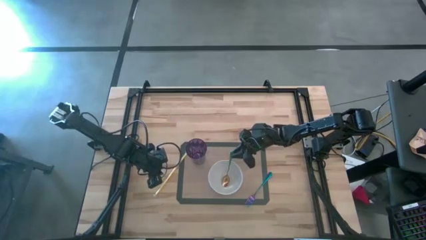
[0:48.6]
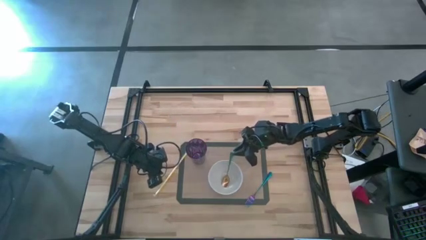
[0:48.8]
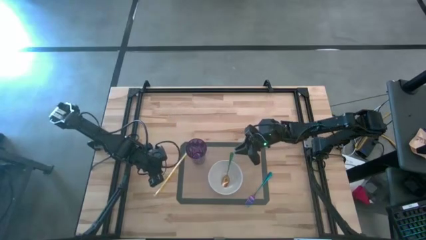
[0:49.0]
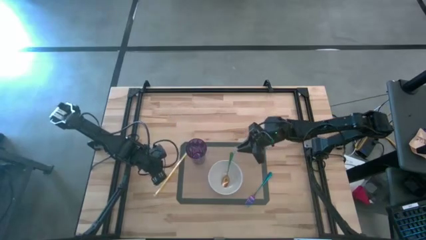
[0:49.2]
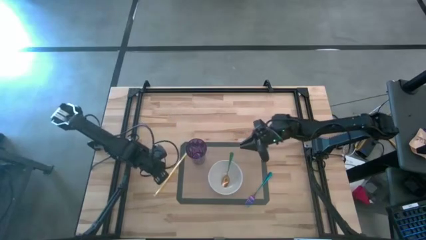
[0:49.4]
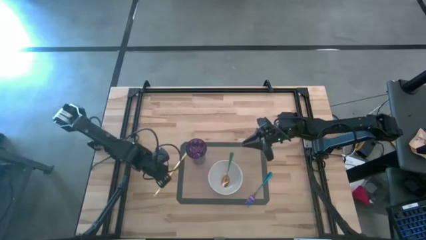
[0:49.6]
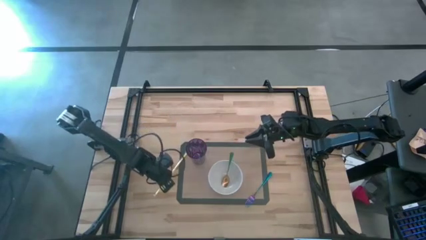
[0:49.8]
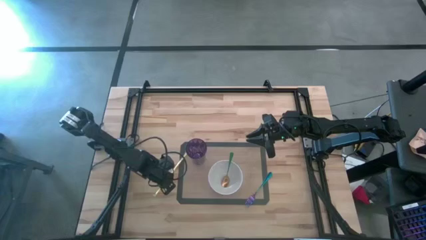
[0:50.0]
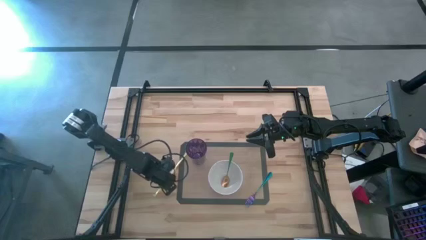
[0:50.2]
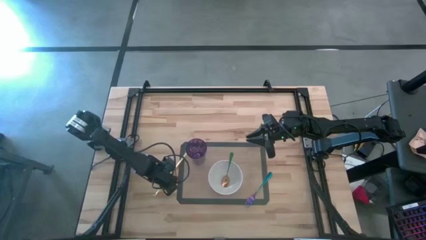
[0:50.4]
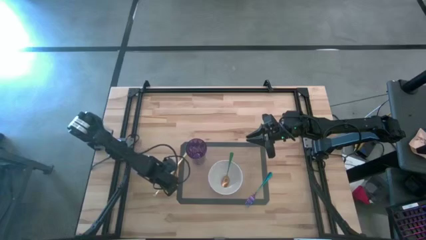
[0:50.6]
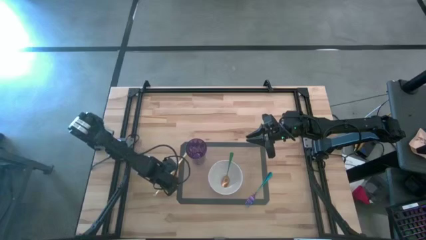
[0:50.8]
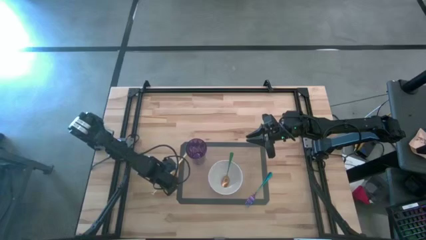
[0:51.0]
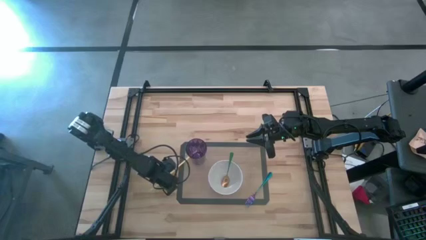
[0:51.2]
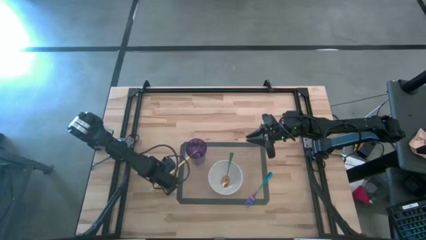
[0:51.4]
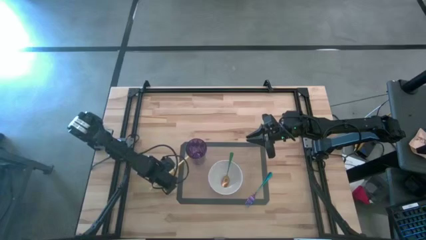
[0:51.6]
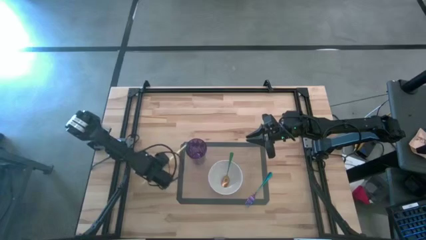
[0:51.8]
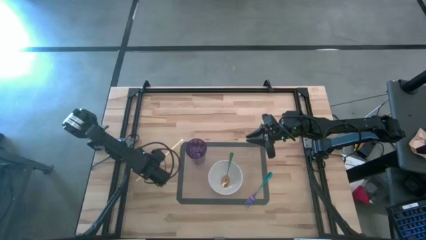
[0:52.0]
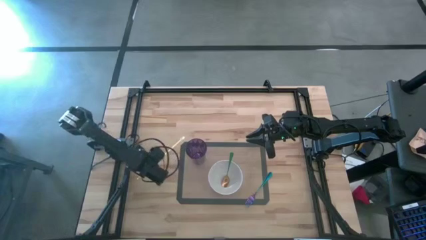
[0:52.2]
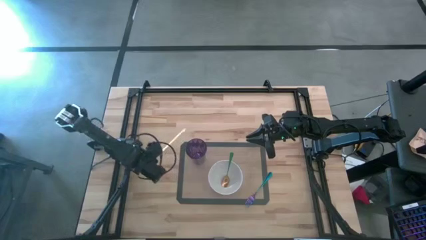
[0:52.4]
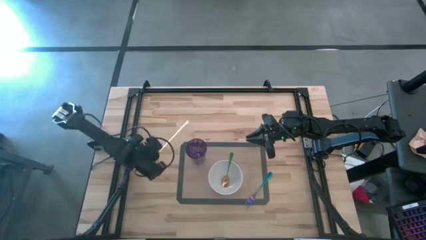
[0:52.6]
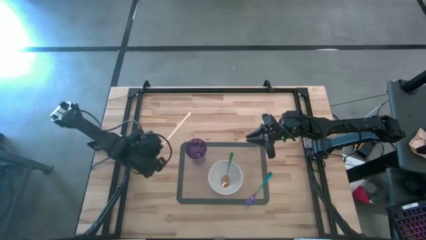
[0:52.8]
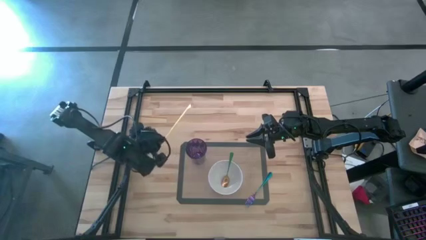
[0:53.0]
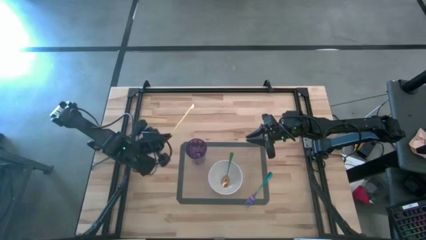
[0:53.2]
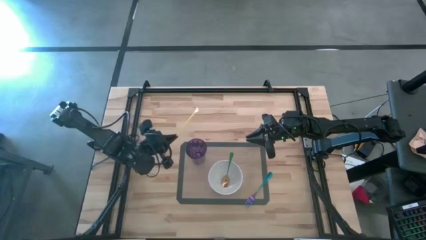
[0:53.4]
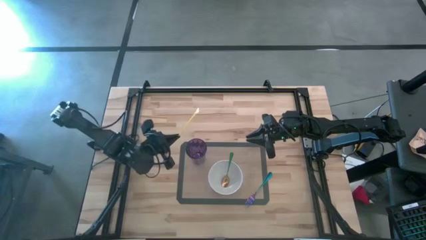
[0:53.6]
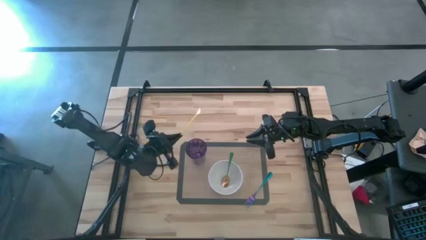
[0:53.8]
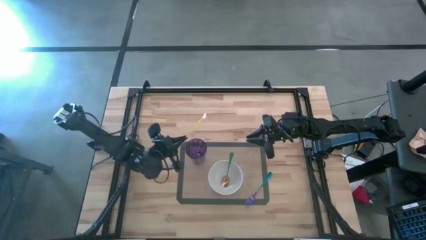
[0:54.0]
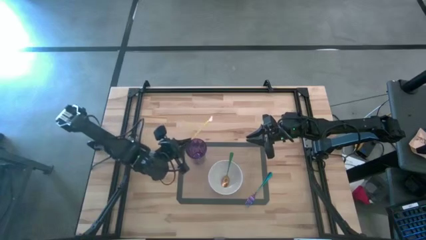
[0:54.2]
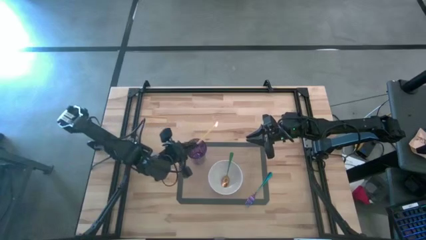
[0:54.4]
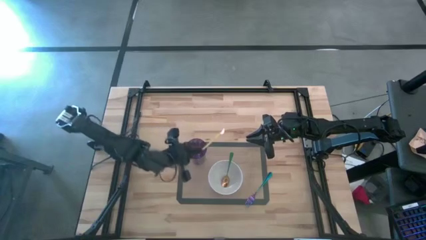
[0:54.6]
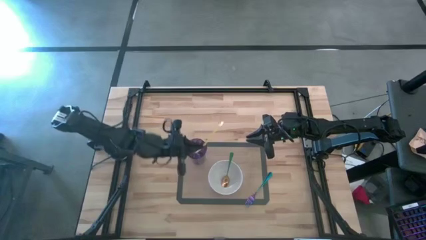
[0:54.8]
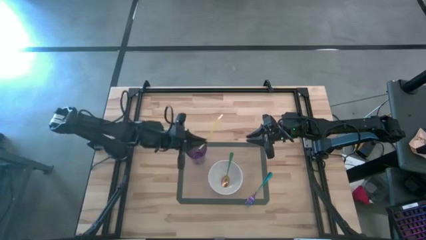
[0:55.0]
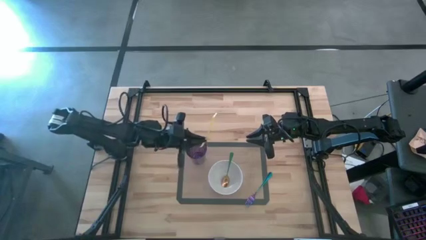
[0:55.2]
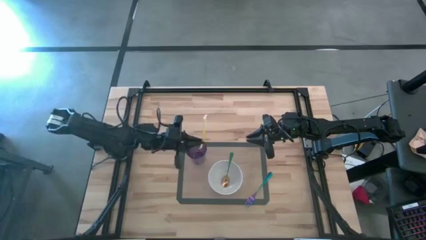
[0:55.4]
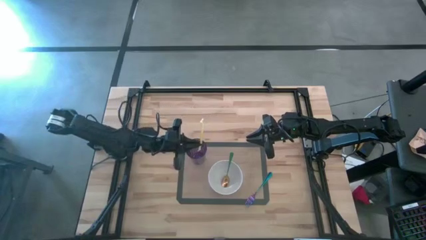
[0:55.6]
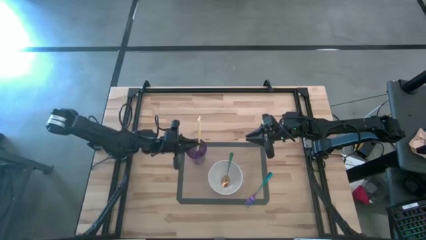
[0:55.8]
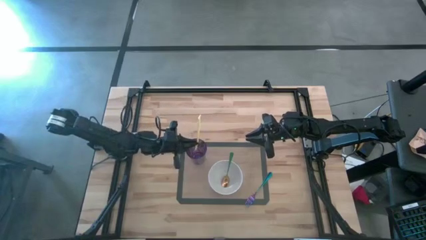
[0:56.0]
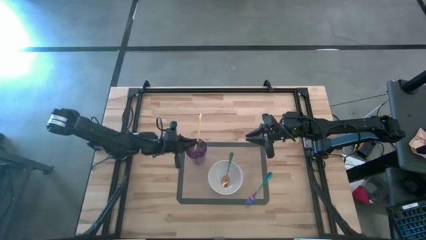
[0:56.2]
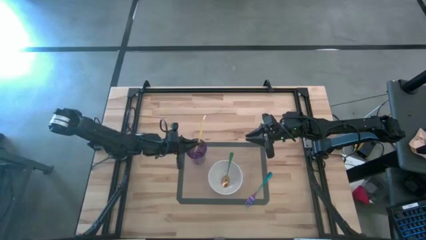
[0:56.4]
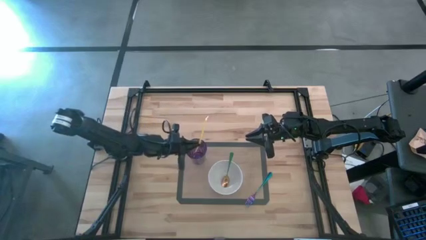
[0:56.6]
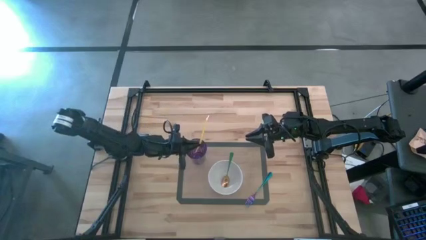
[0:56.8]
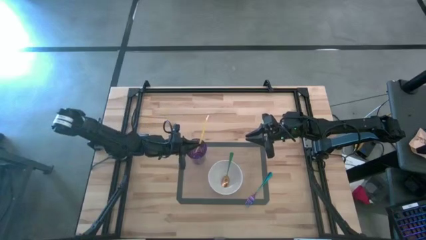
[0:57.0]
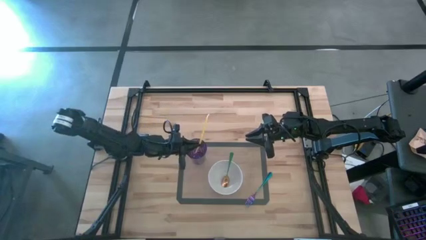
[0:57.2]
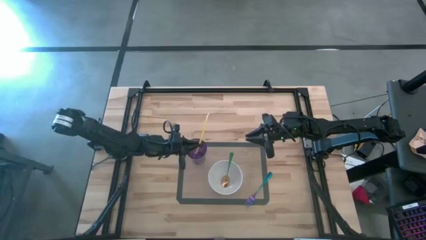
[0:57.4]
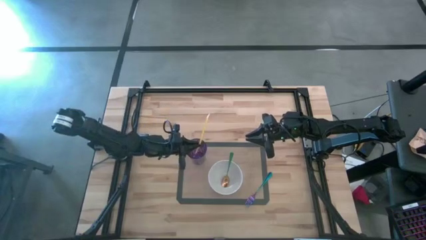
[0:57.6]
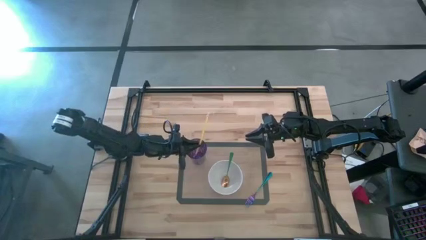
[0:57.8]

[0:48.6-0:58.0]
Task: Pick & Place Utensil
Put the yellow straw into the violet cup

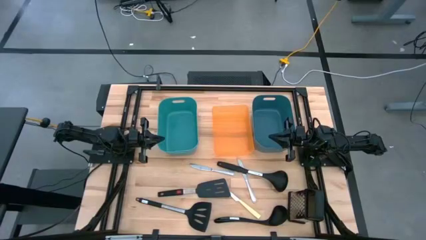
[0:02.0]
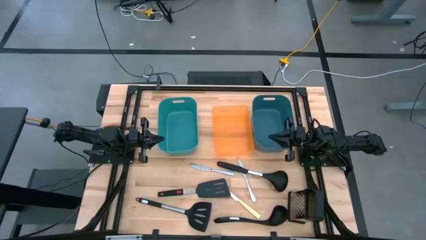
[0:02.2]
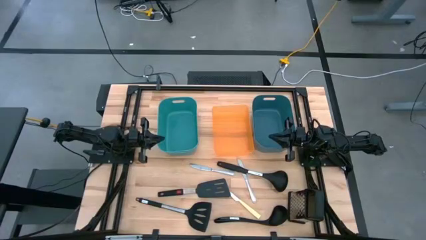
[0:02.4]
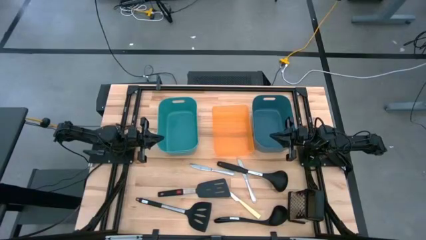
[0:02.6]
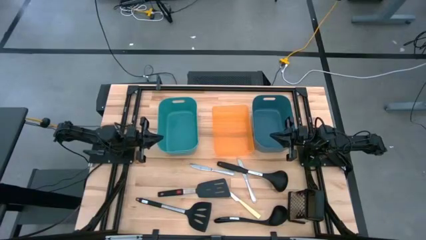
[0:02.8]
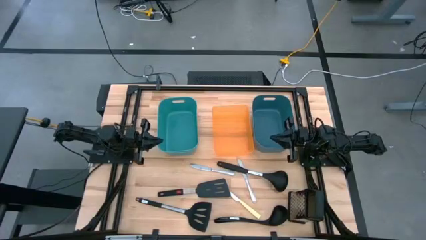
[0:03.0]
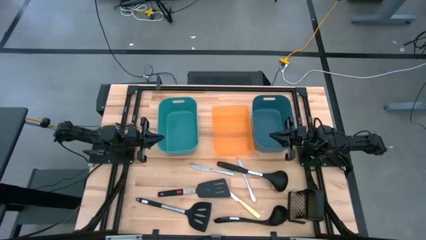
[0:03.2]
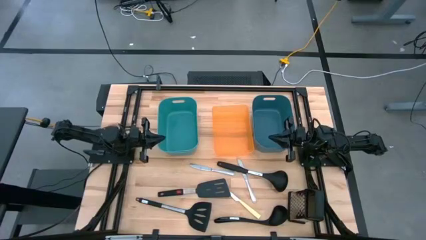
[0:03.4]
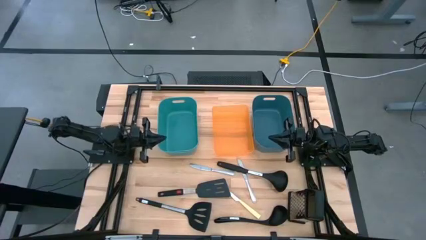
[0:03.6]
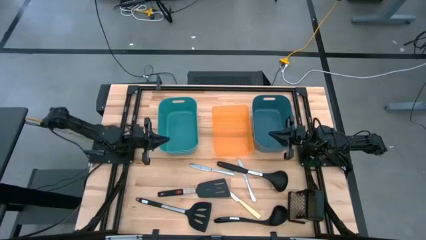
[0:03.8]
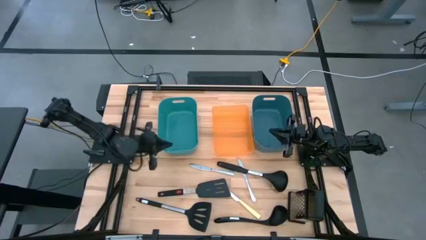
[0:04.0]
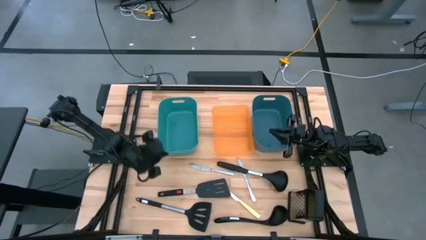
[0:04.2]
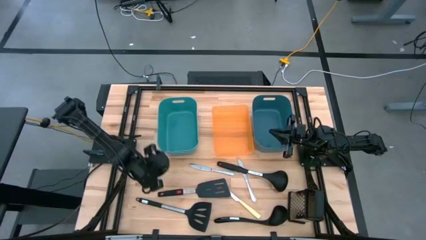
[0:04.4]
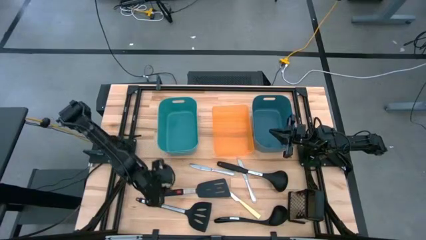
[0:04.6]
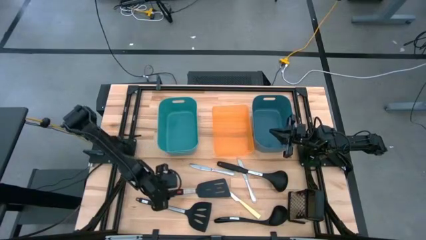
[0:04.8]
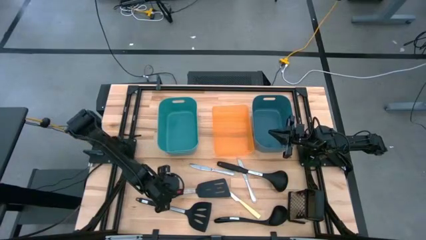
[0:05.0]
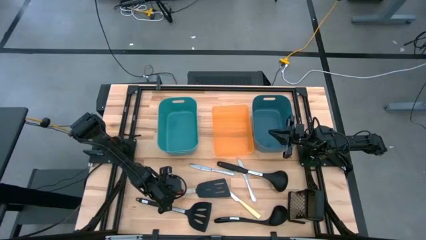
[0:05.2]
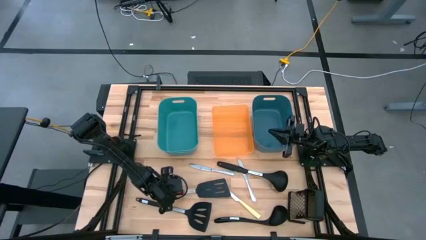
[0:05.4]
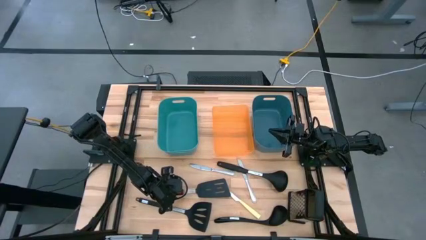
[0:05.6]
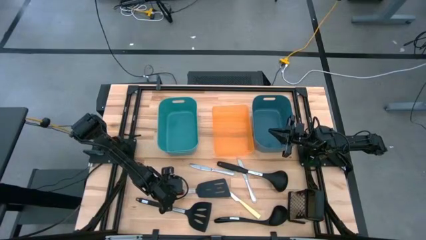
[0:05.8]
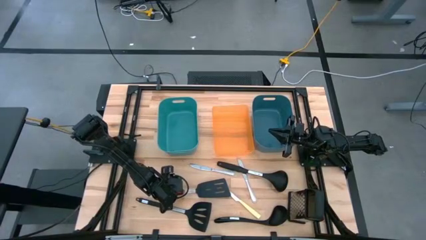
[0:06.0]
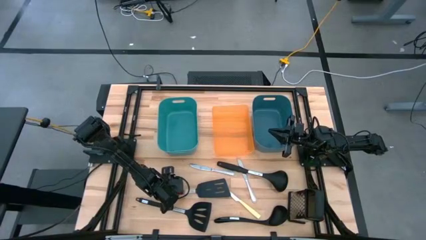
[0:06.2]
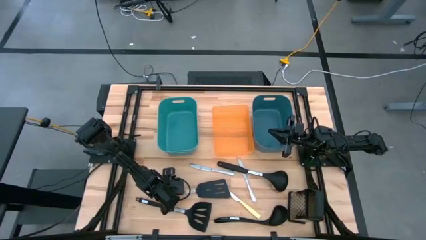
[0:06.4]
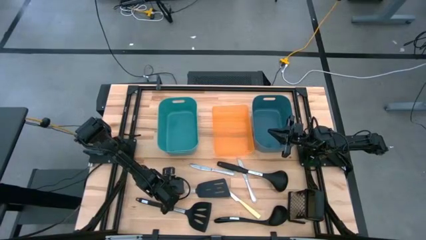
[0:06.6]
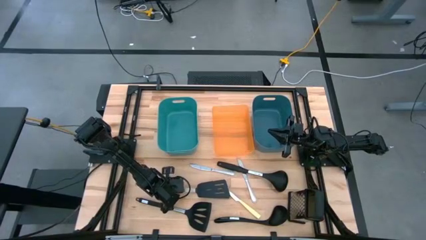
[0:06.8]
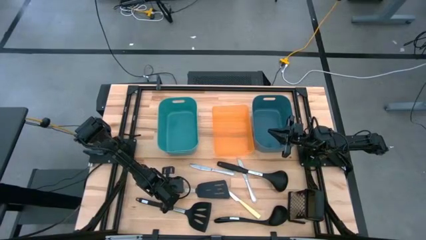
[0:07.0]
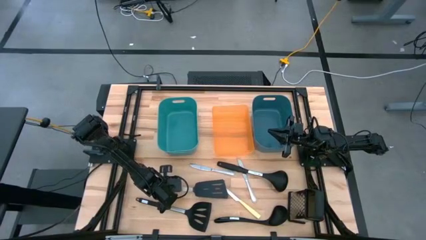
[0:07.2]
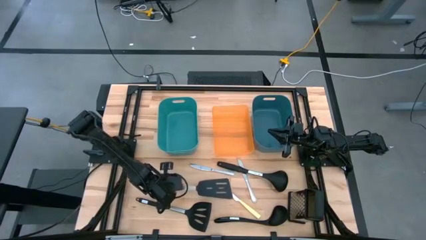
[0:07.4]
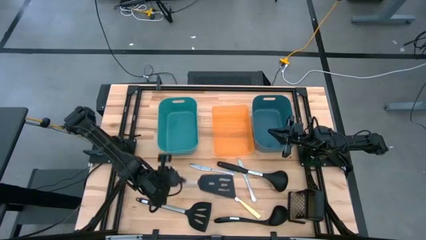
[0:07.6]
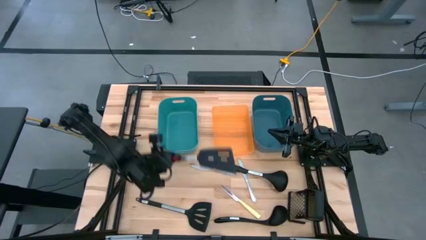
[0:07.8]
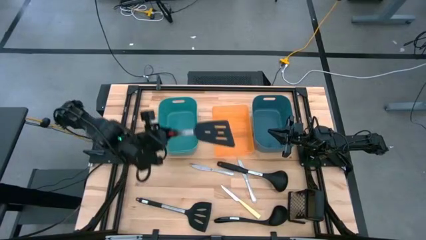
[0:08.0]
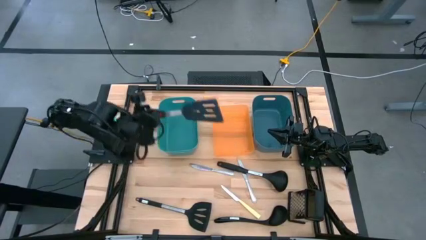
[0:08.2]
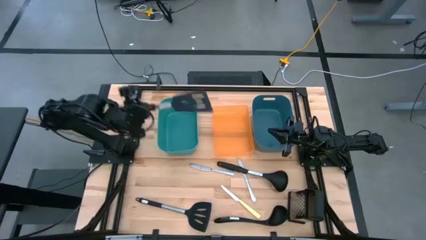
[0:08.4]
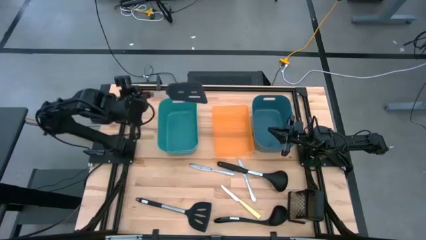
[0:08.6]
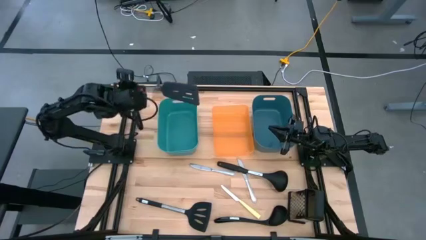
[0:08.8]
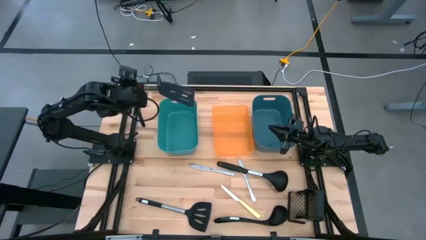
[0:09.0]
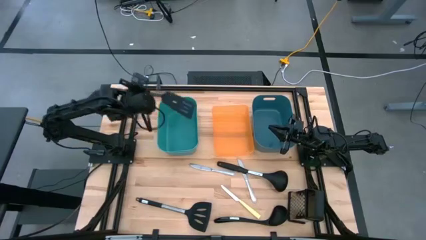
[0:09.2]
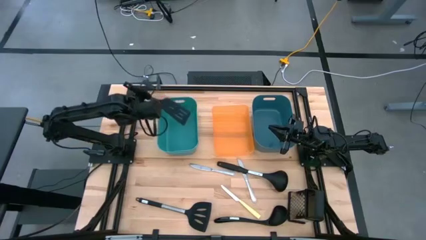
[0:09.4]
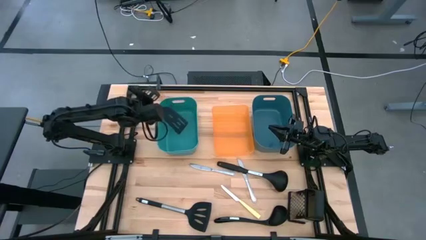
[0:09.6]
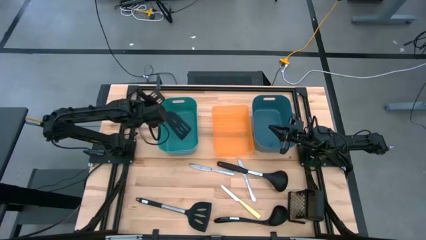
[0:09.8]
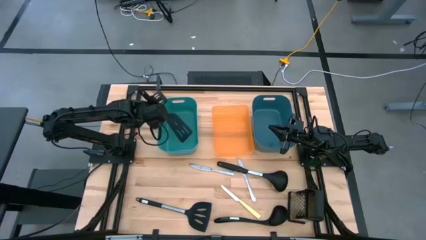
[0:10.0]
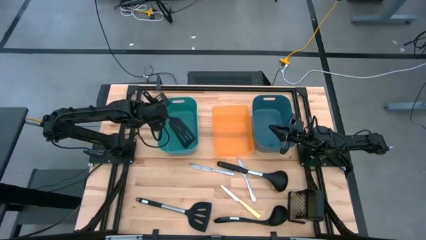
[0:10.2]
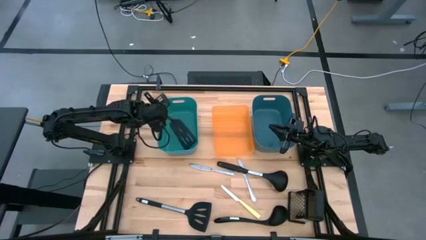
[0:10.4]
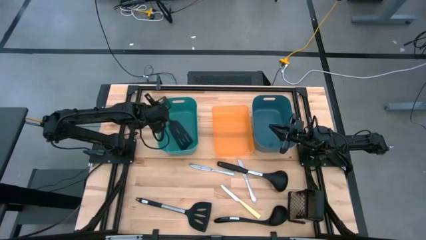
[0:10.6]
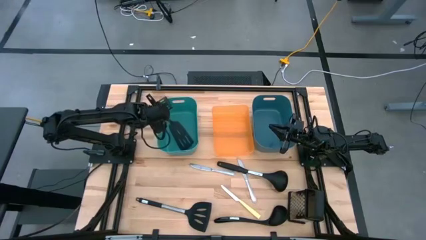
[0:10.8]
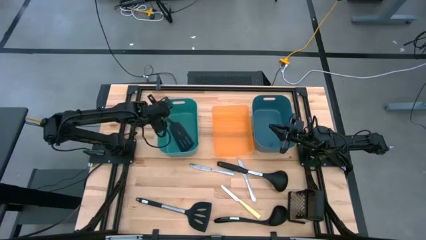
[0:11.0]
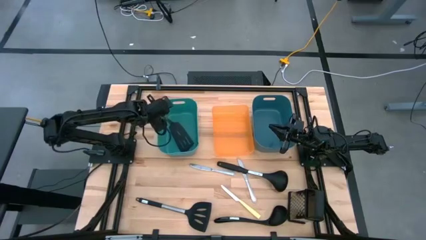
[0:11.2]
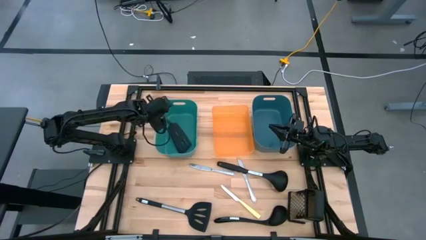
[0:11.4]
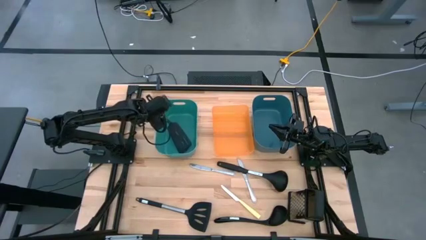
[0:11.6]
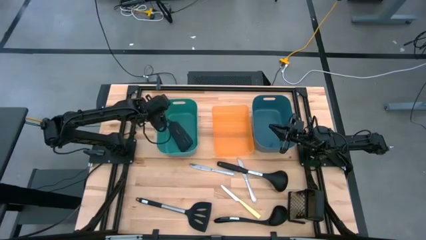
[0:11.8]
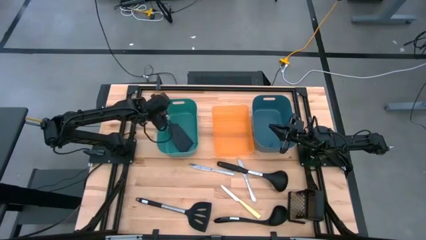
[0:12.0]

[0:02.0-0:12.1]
Task: Pick & Place Kitchen Items
Put the gray spatula into the green bin
